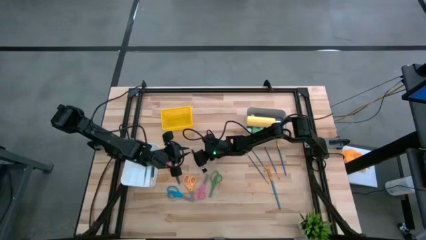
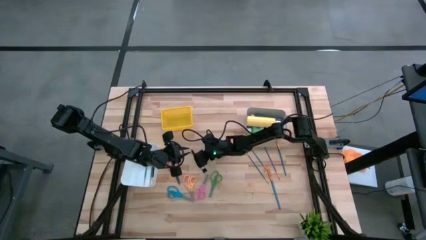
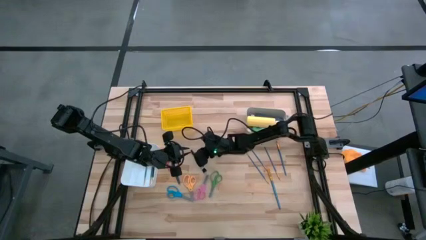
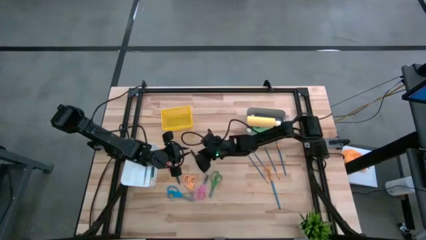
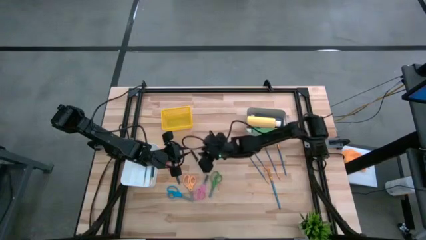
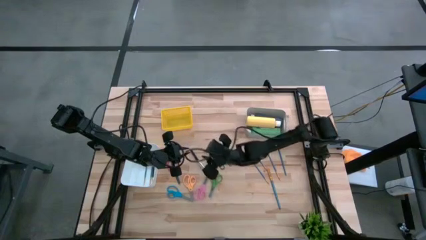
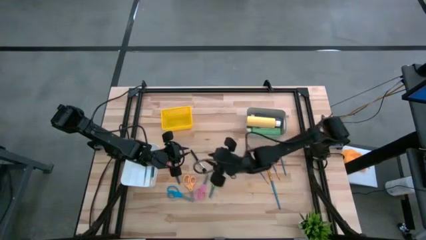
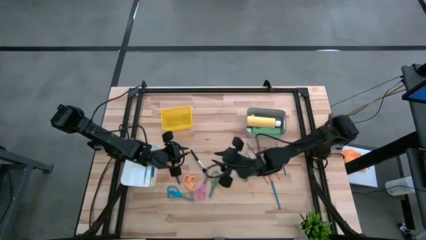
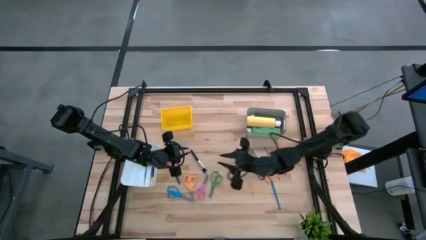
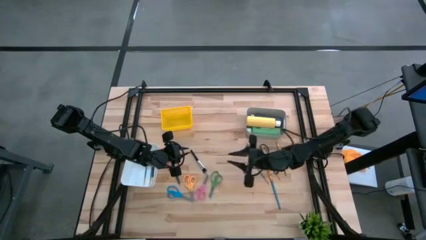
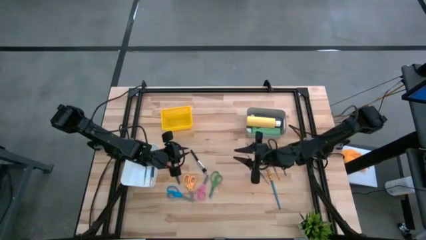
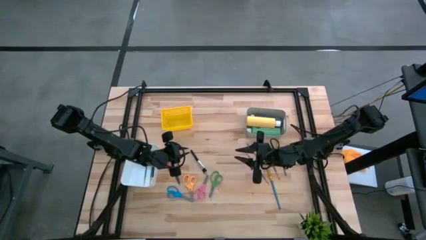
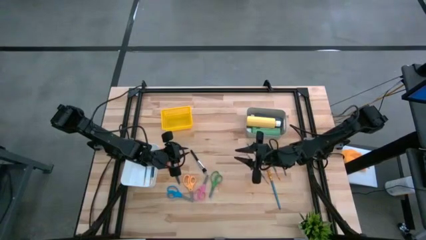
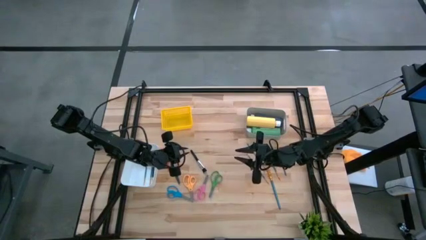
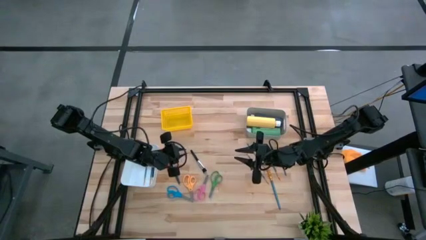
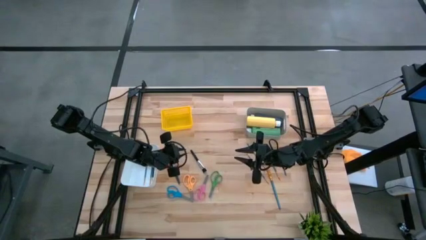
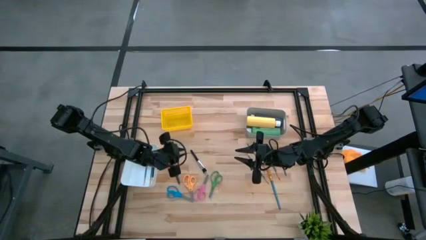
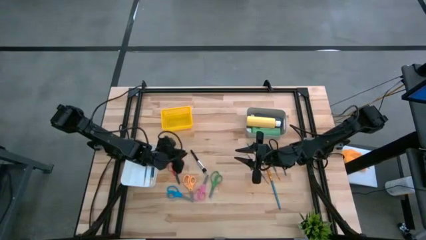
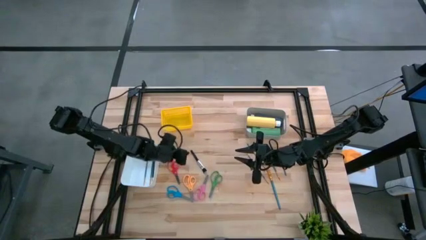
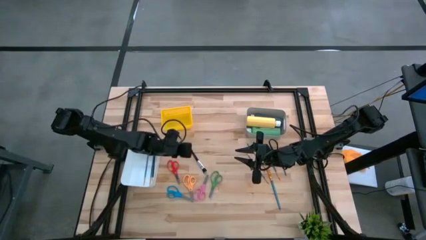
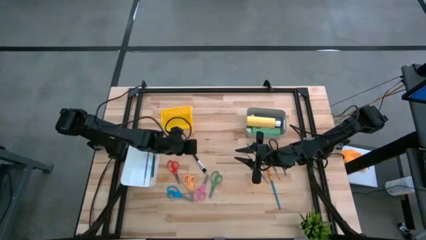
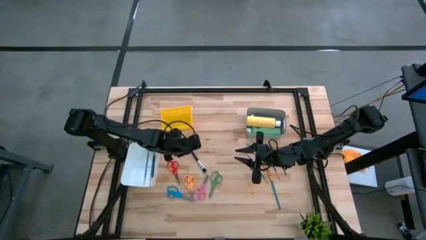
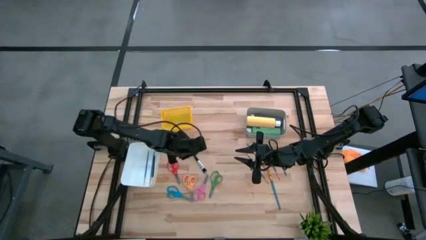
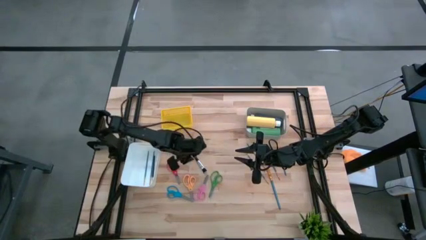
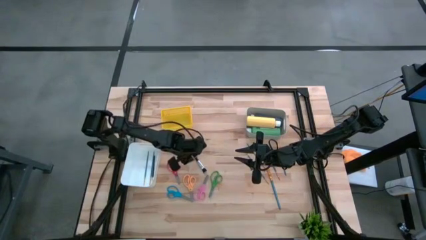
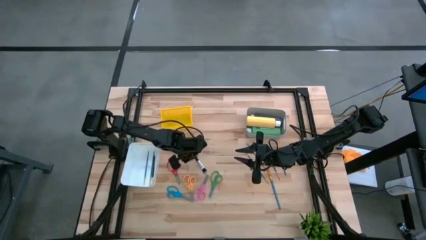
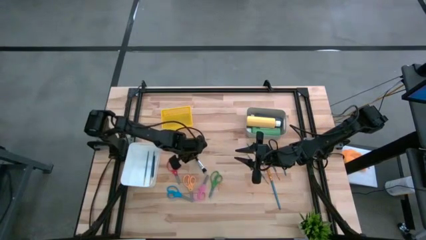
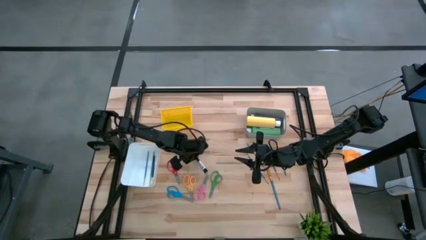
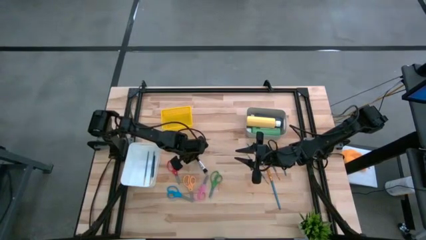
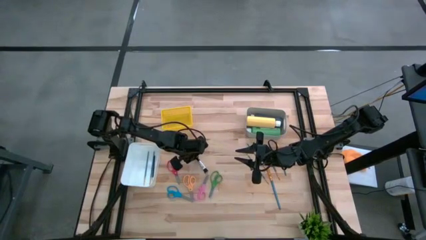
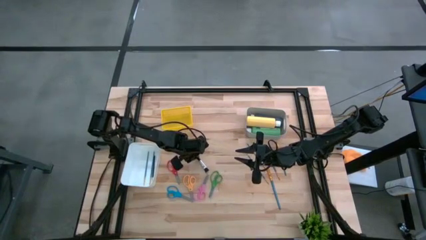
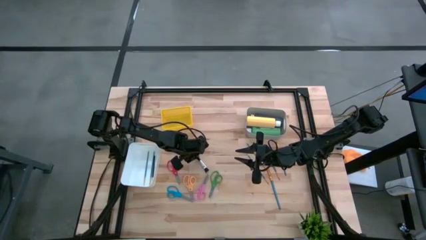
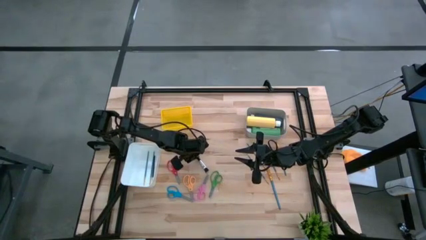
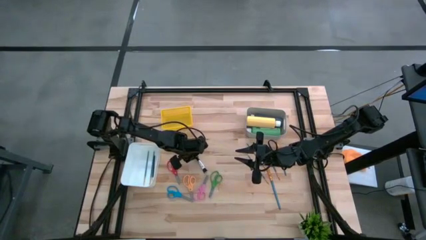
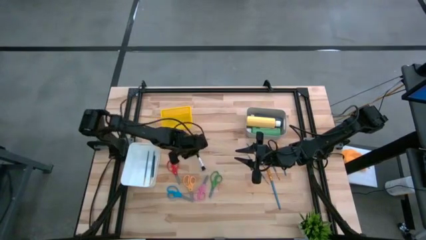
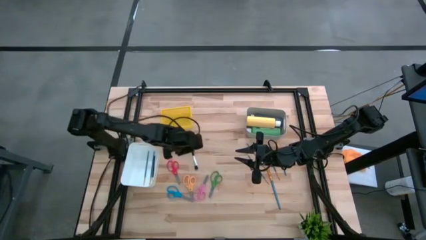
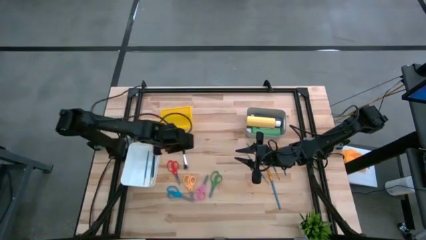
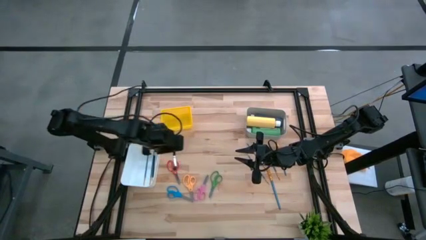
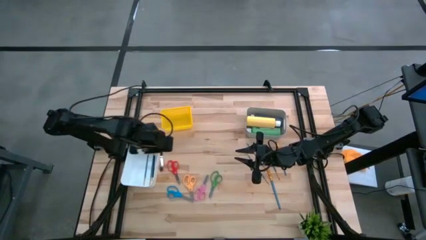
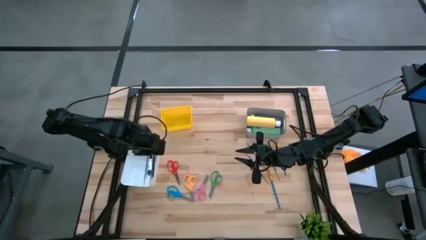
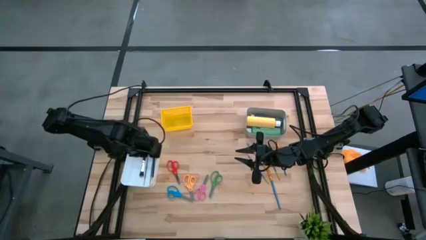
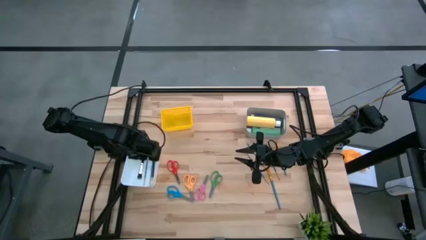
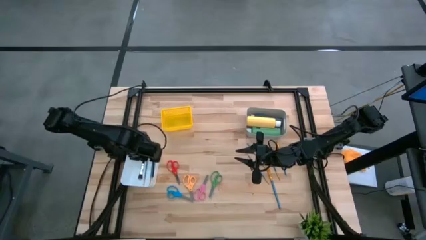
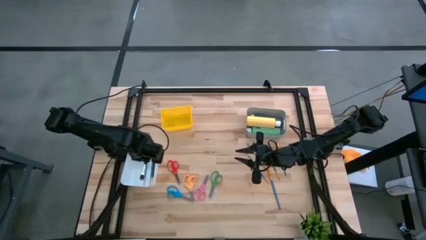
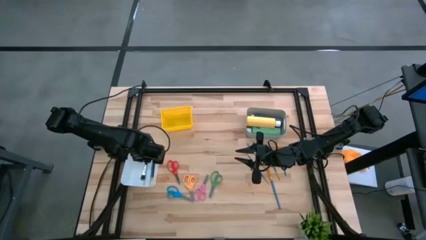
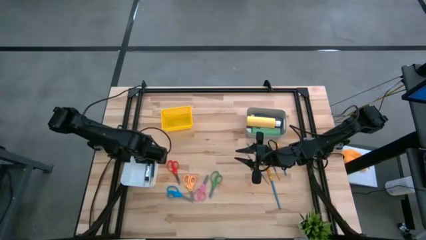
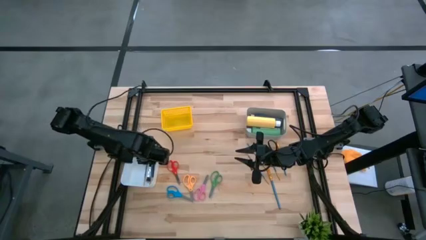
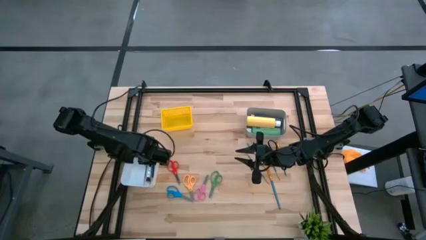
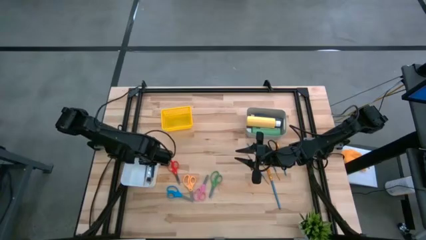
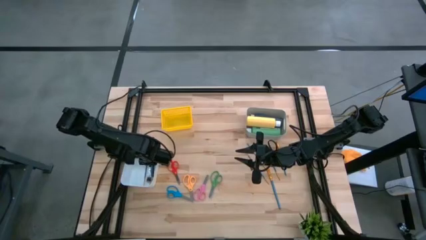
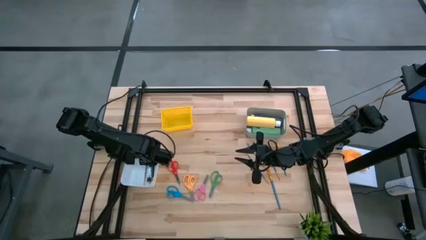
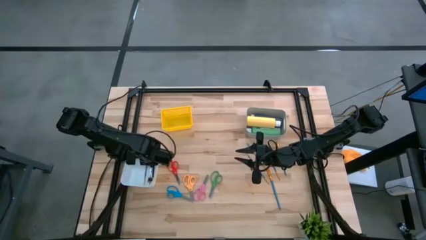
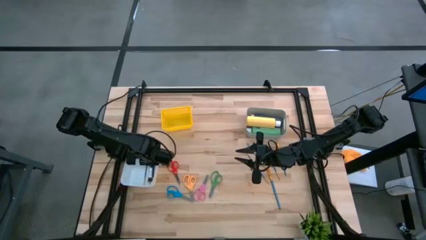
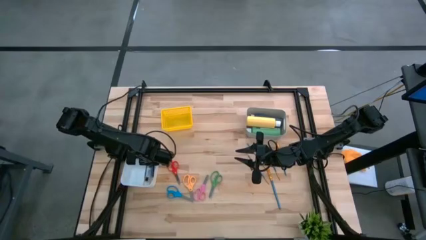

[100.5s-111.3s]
Task: Pick & Place Paint Supplies
Put the black foundation brush into the white bin

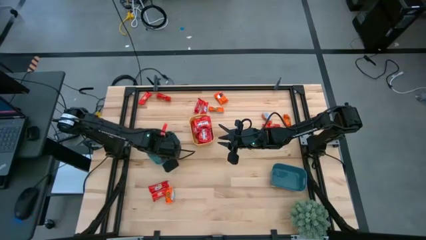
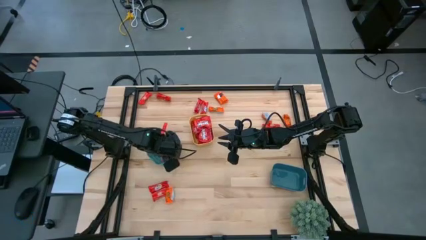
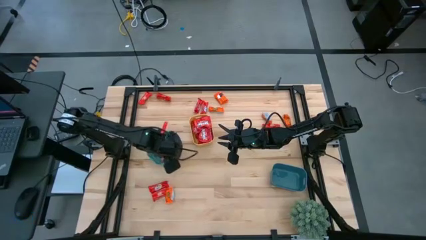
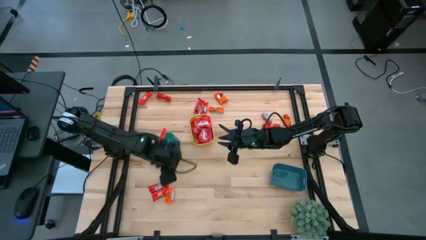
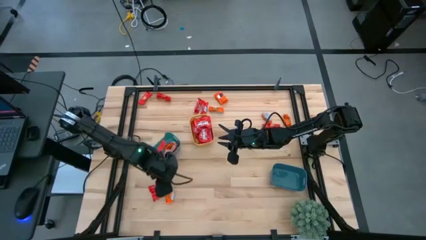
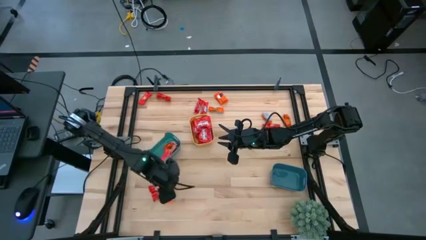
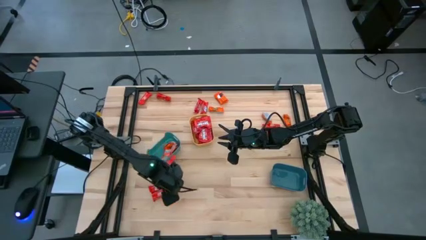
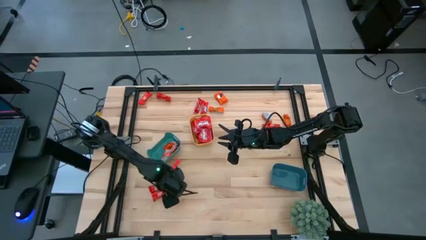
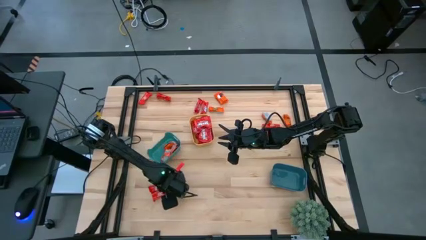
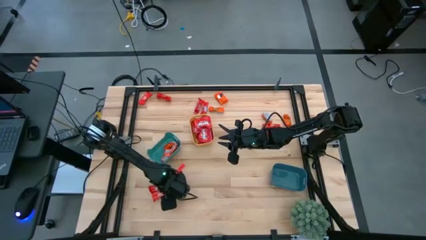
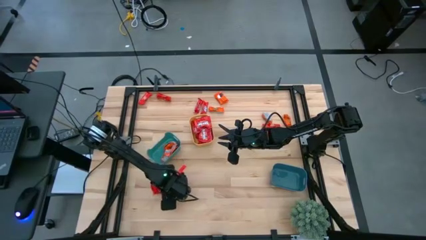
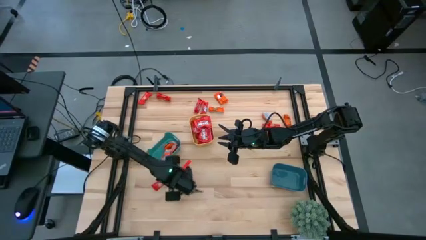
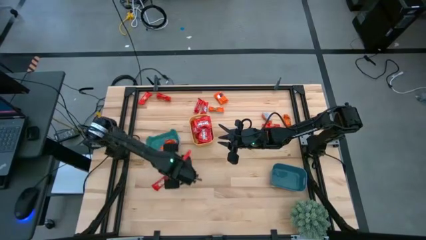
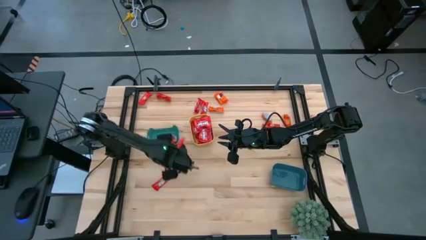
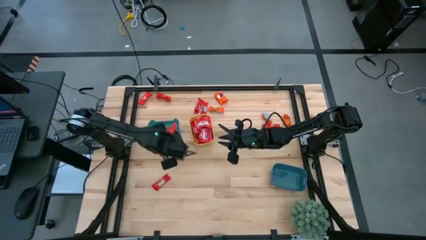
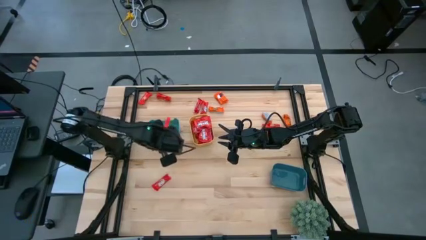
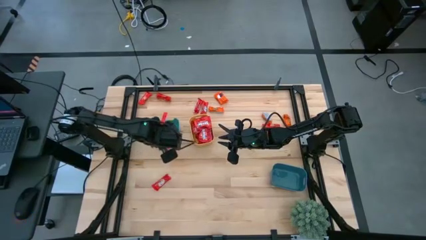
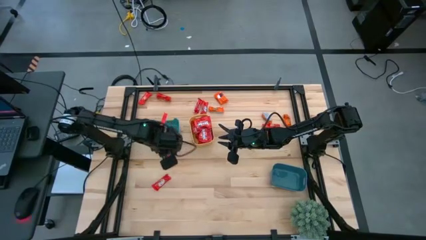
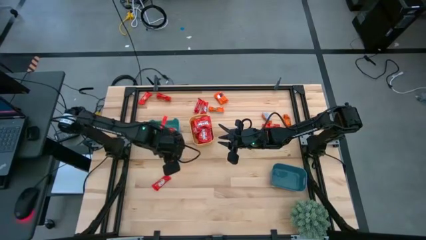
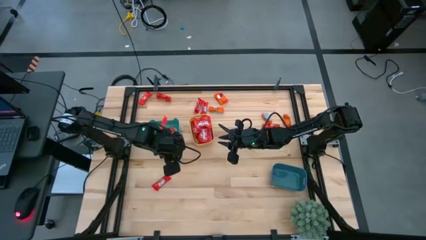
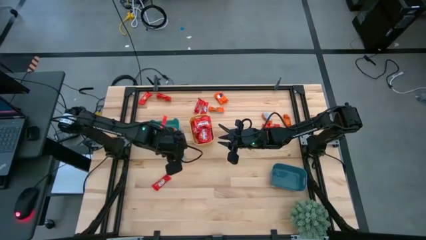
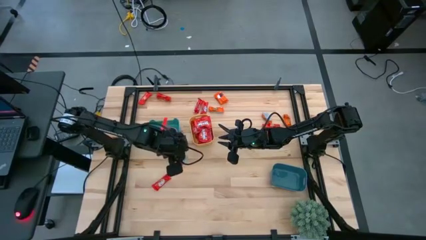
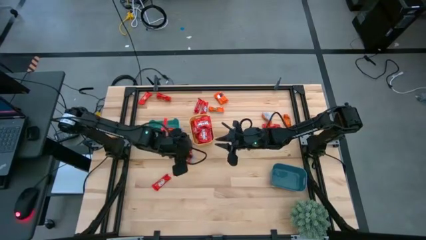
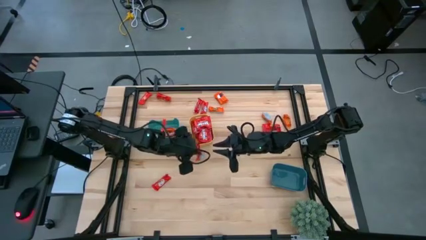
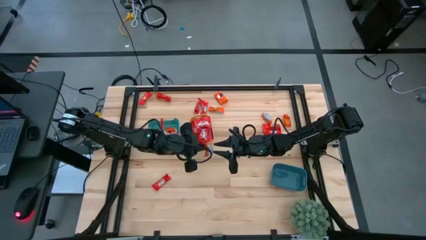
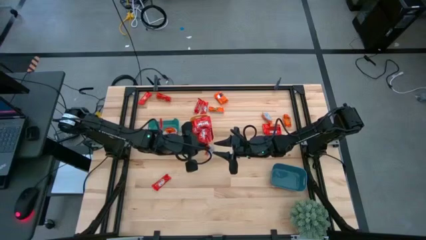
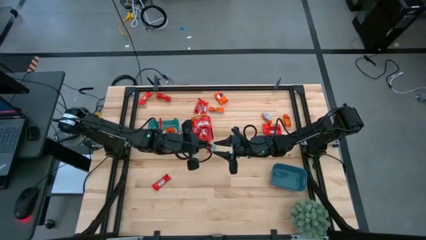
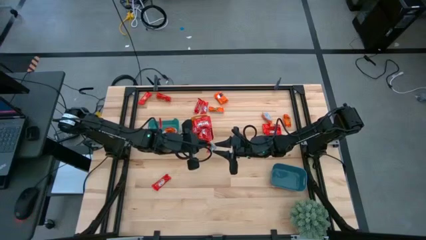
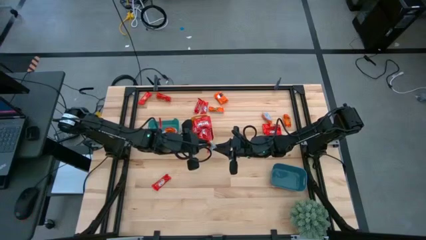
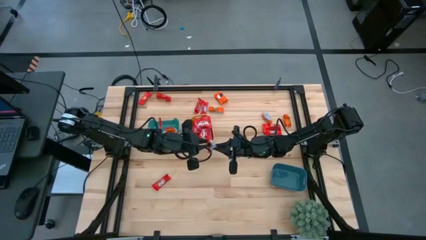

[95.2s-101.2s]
Task: Sort candy
Put the orange candy into the green bin

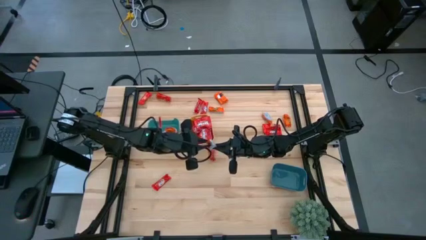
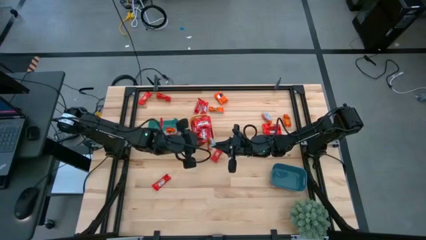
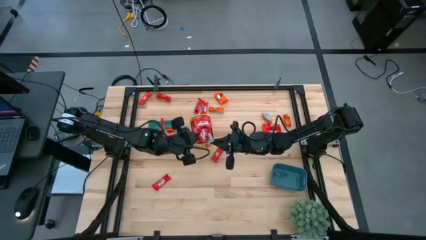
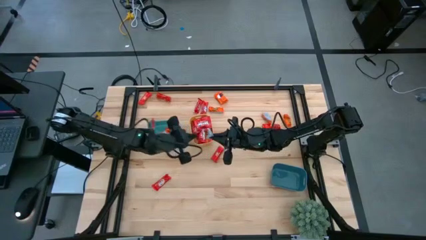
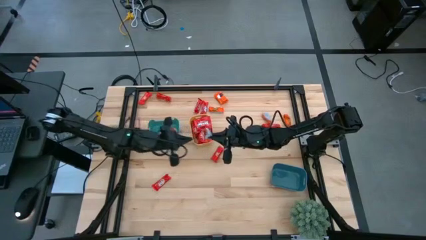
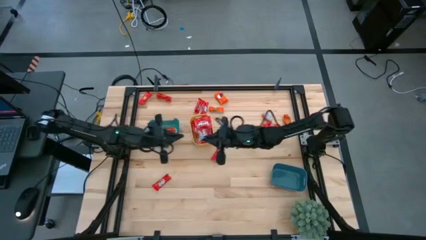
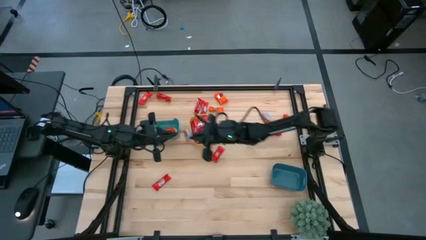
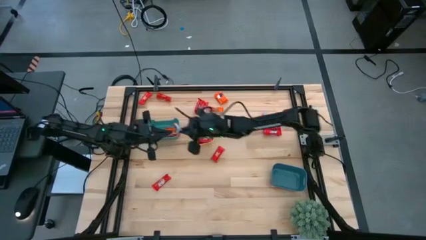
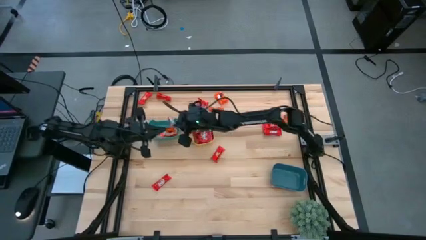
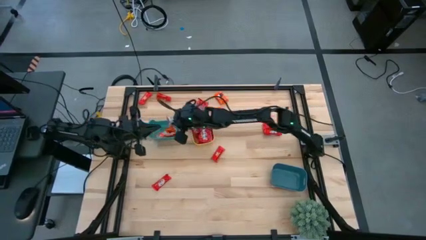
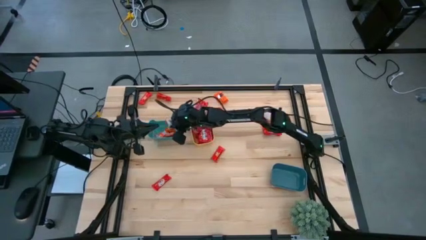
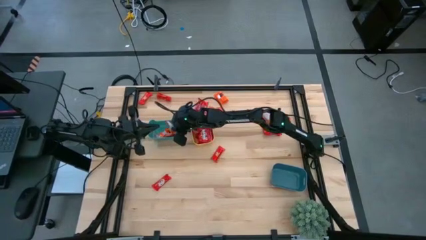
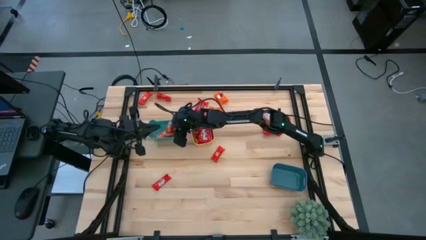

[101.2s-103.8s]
Put the orange candy into the green bin
